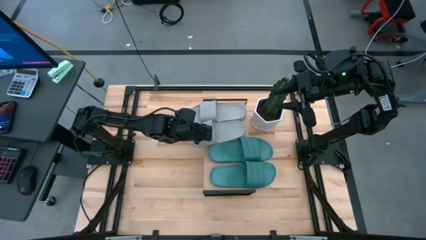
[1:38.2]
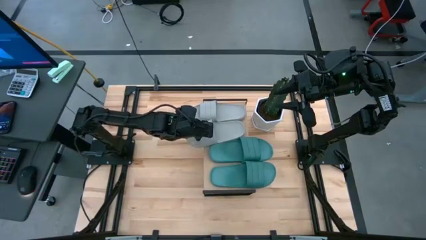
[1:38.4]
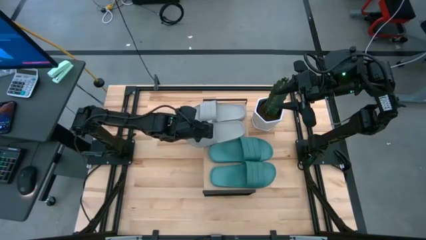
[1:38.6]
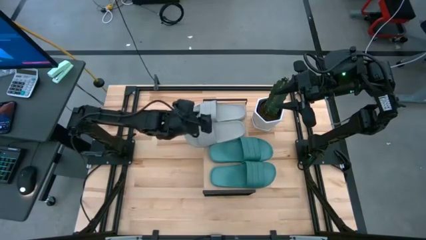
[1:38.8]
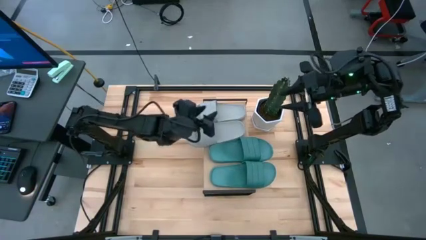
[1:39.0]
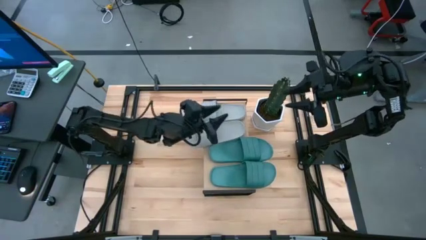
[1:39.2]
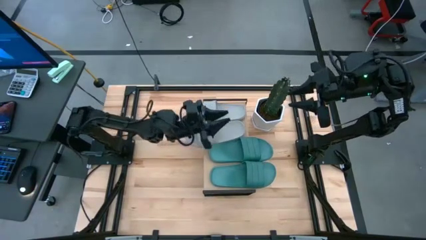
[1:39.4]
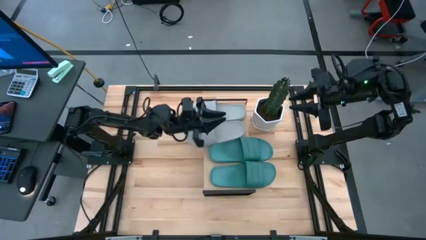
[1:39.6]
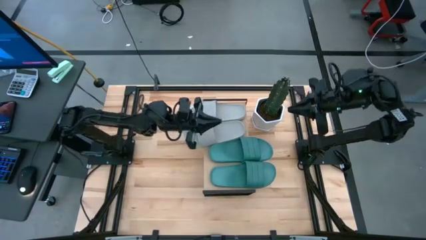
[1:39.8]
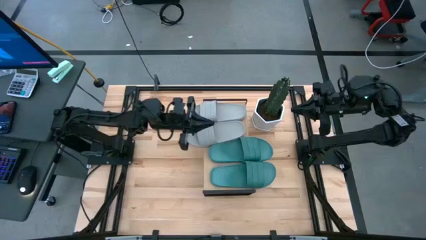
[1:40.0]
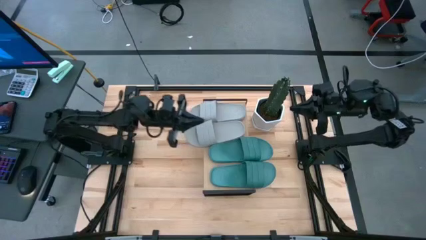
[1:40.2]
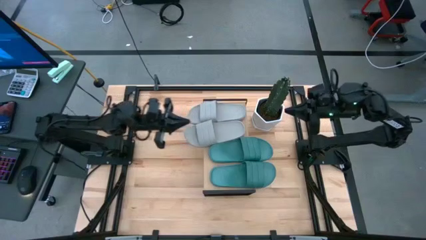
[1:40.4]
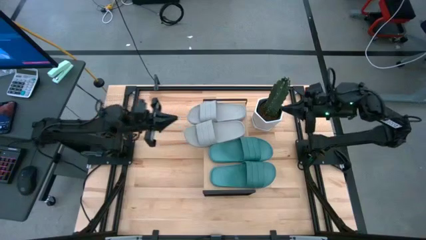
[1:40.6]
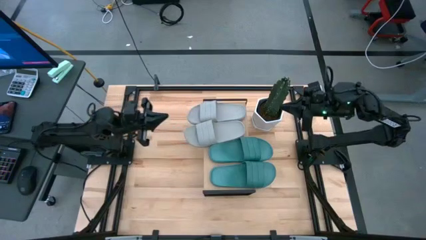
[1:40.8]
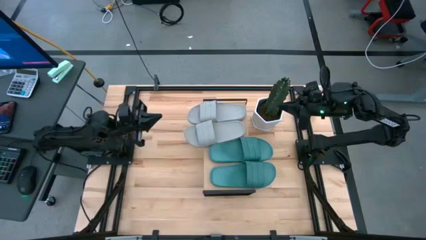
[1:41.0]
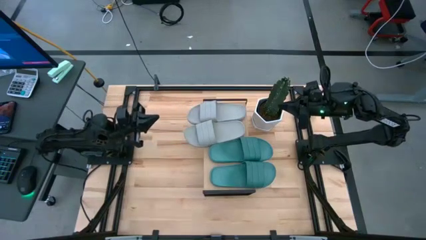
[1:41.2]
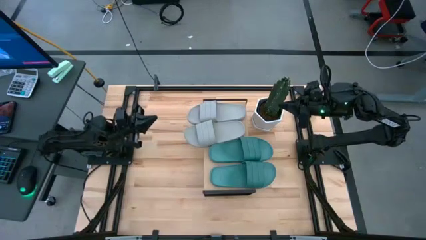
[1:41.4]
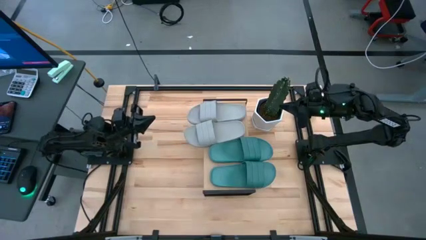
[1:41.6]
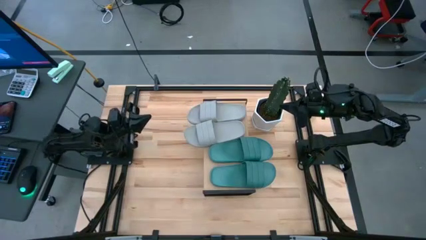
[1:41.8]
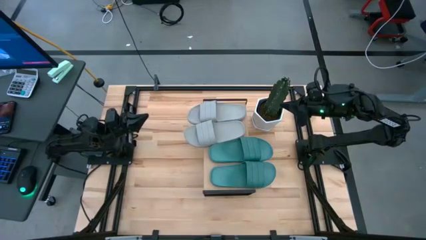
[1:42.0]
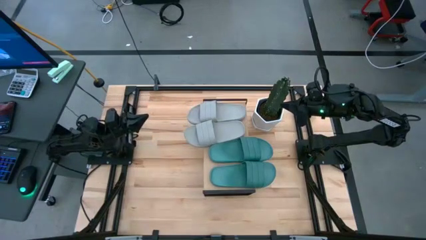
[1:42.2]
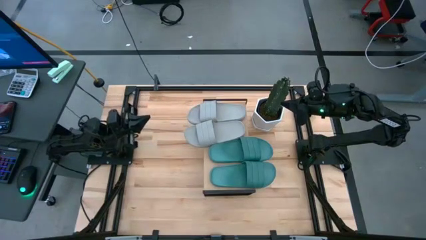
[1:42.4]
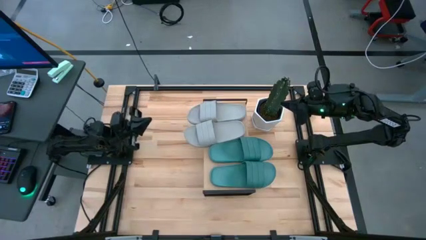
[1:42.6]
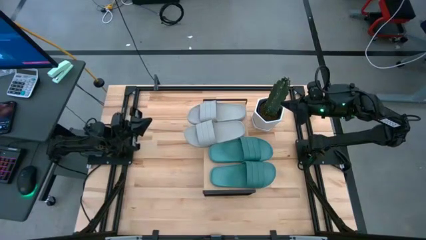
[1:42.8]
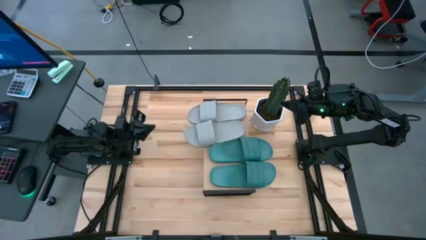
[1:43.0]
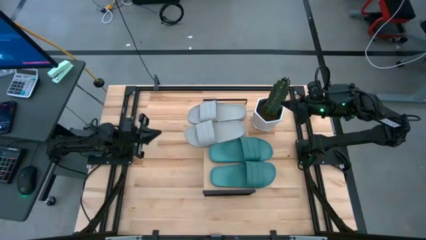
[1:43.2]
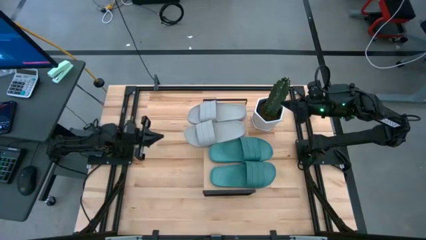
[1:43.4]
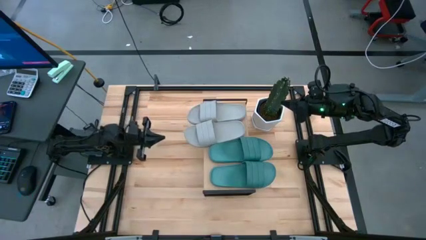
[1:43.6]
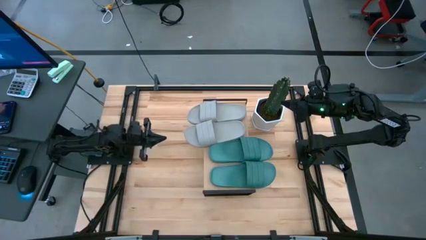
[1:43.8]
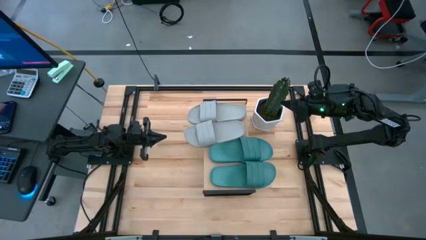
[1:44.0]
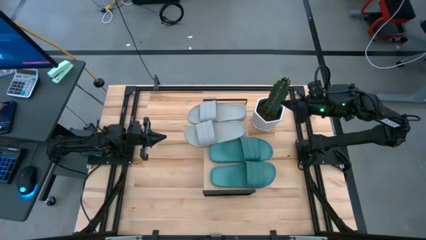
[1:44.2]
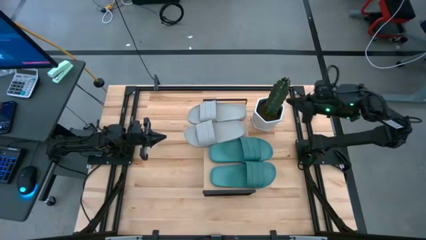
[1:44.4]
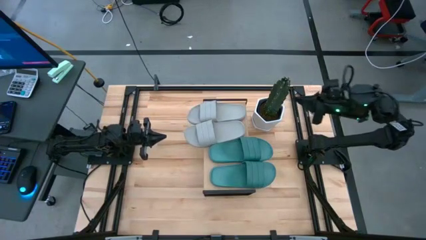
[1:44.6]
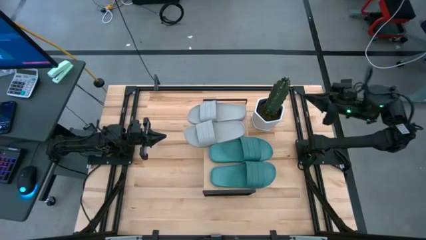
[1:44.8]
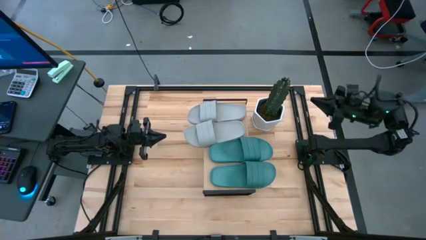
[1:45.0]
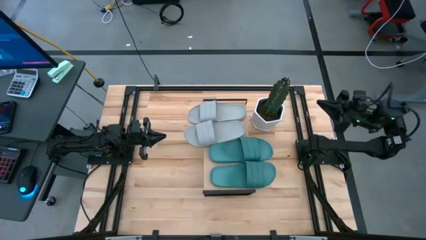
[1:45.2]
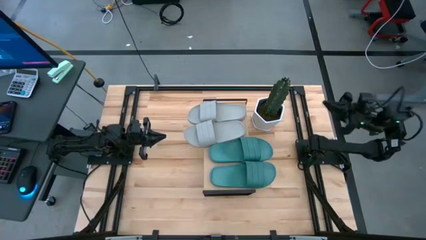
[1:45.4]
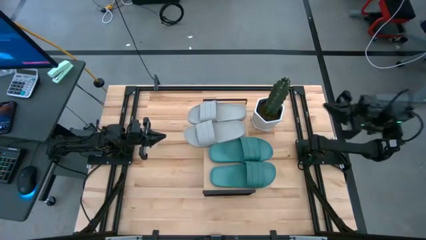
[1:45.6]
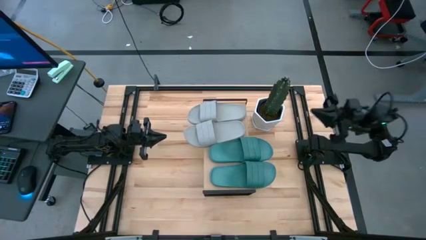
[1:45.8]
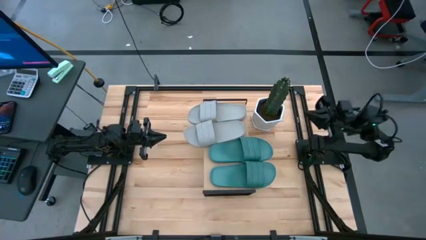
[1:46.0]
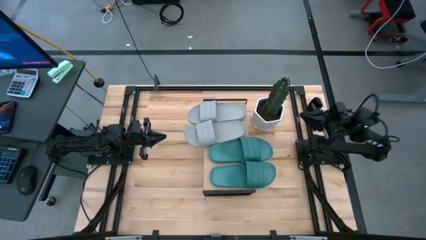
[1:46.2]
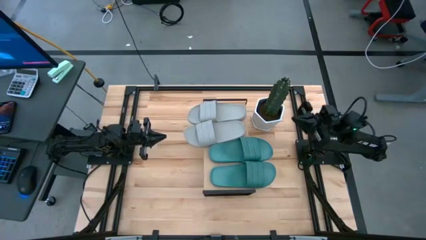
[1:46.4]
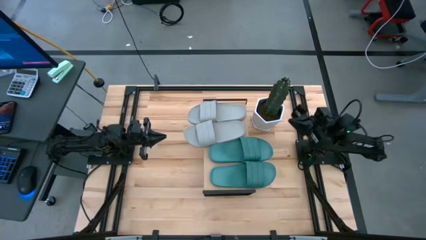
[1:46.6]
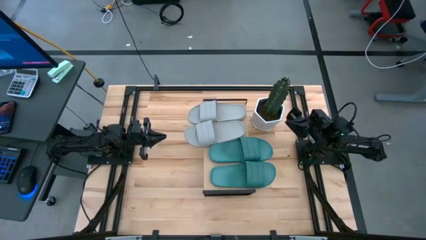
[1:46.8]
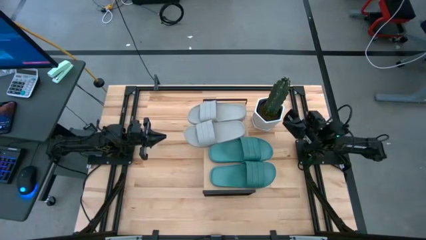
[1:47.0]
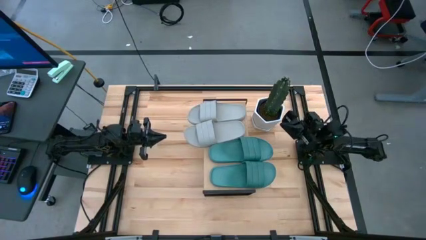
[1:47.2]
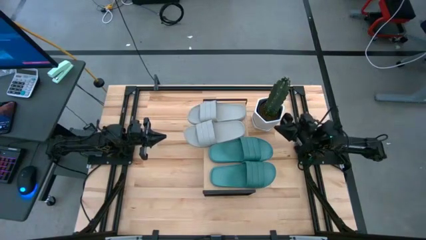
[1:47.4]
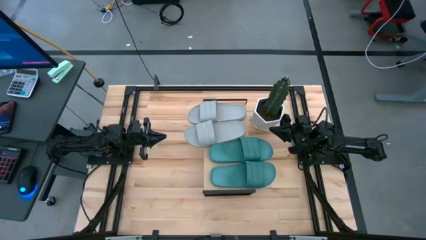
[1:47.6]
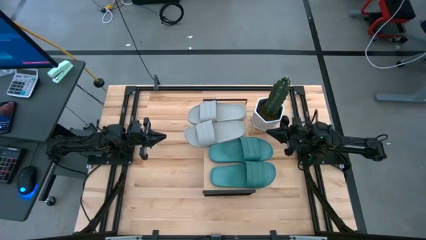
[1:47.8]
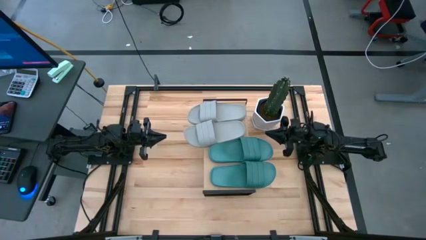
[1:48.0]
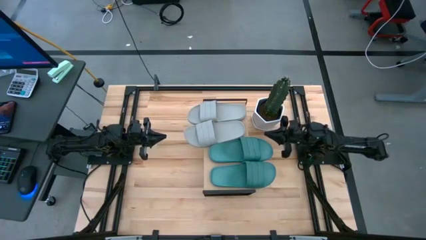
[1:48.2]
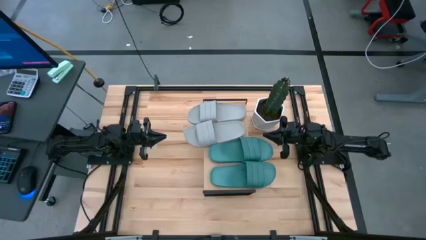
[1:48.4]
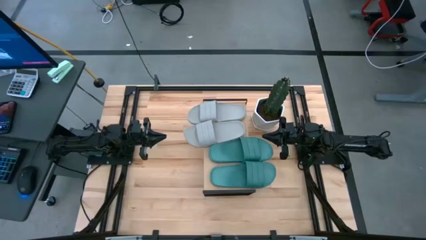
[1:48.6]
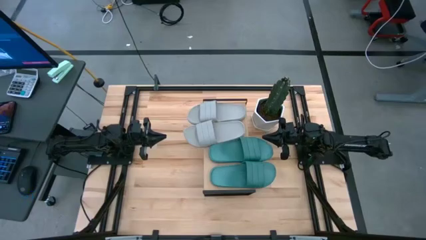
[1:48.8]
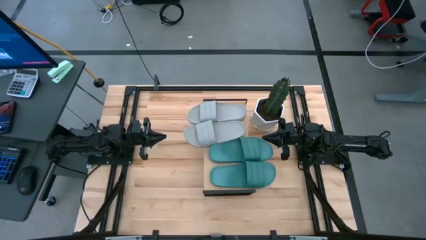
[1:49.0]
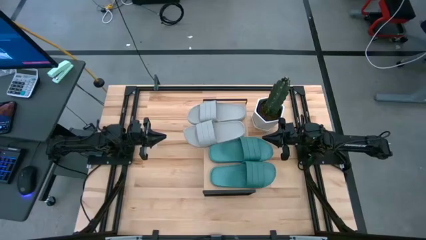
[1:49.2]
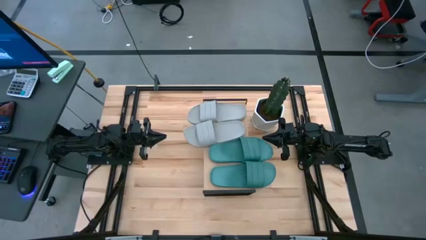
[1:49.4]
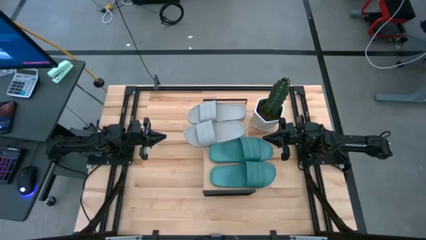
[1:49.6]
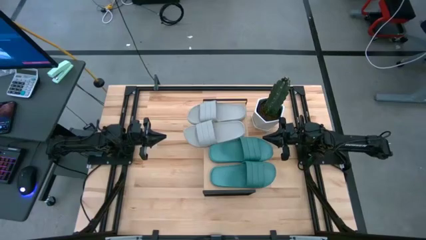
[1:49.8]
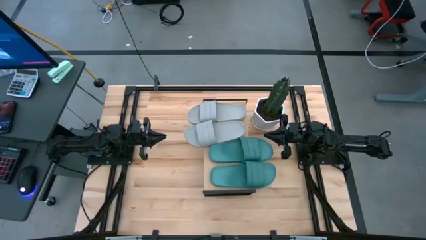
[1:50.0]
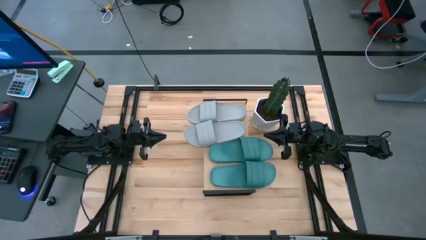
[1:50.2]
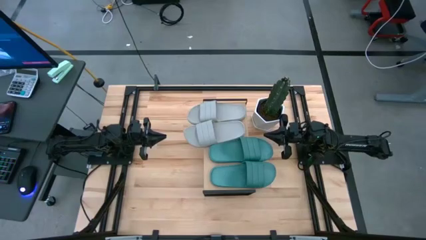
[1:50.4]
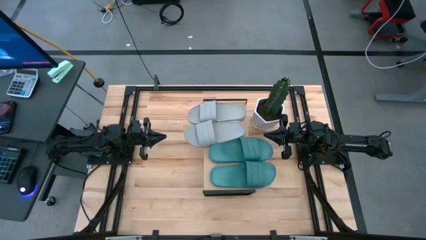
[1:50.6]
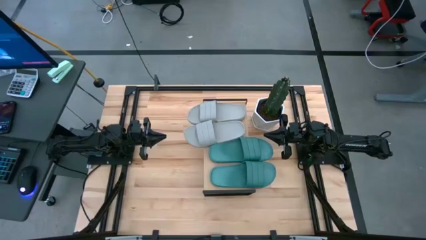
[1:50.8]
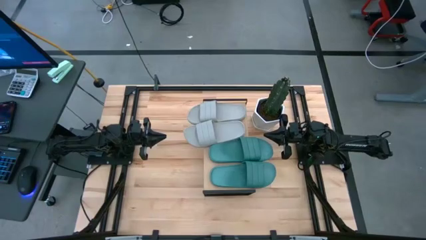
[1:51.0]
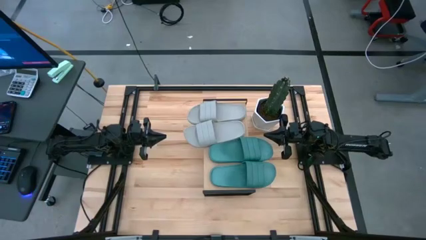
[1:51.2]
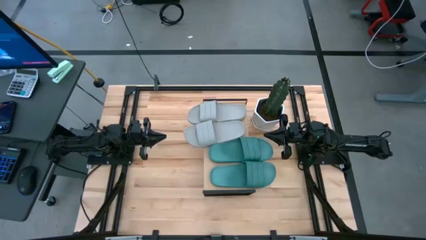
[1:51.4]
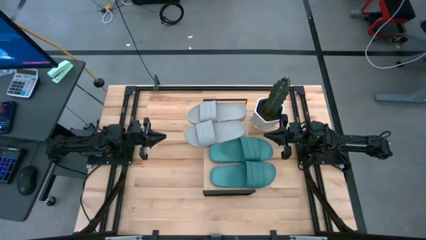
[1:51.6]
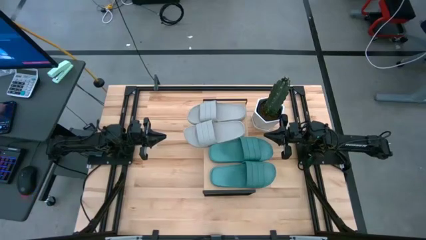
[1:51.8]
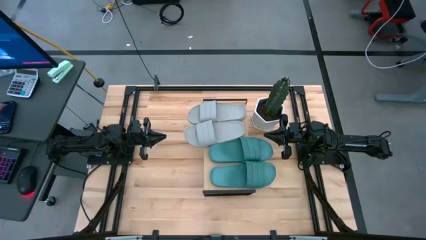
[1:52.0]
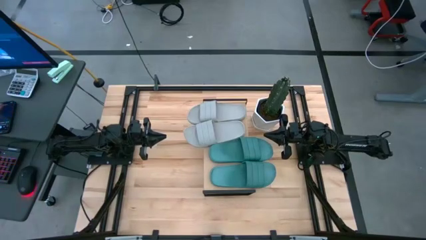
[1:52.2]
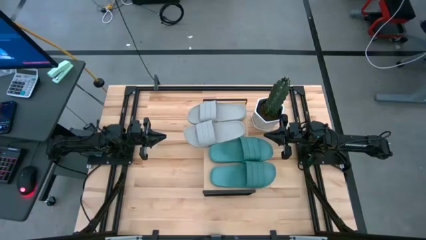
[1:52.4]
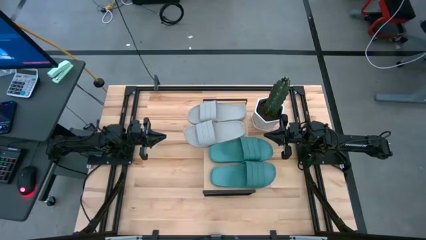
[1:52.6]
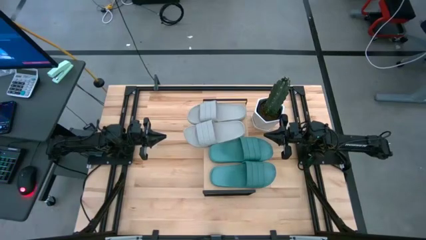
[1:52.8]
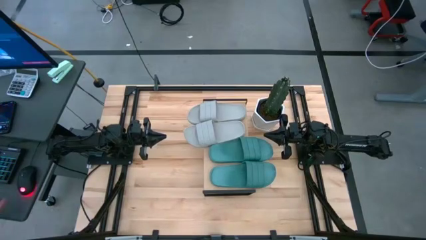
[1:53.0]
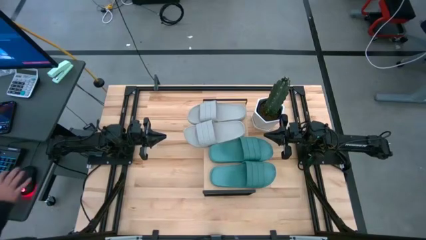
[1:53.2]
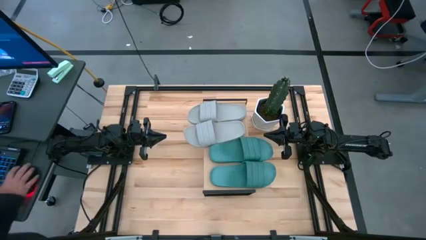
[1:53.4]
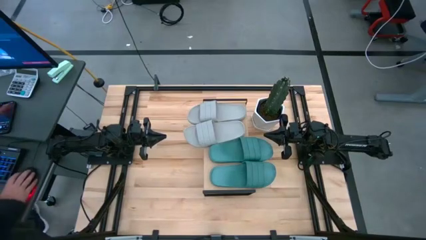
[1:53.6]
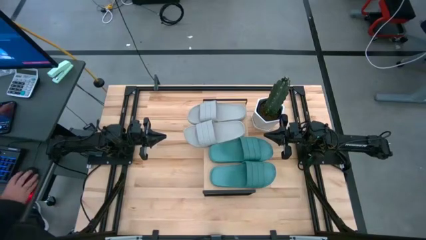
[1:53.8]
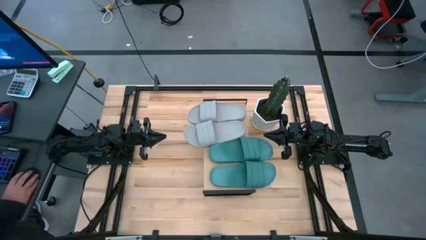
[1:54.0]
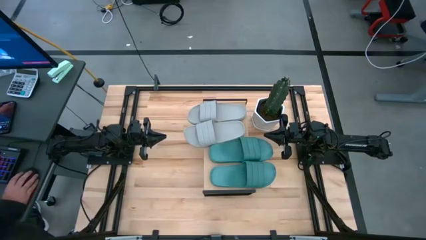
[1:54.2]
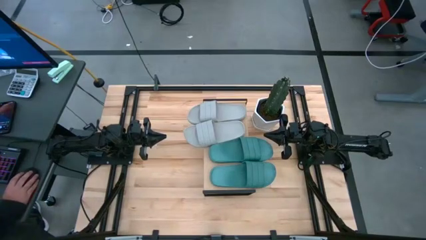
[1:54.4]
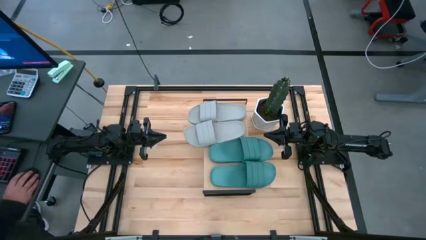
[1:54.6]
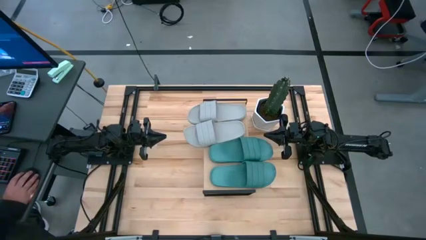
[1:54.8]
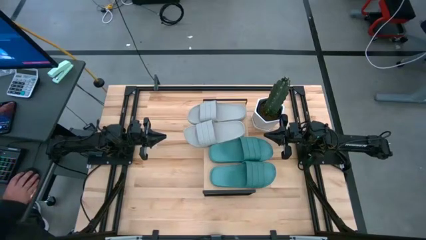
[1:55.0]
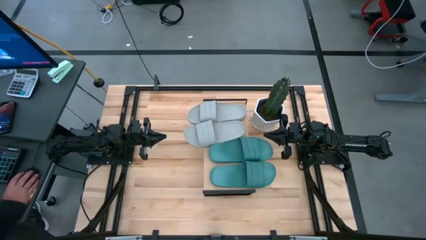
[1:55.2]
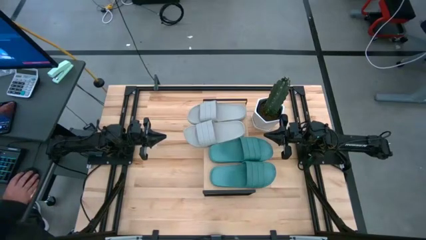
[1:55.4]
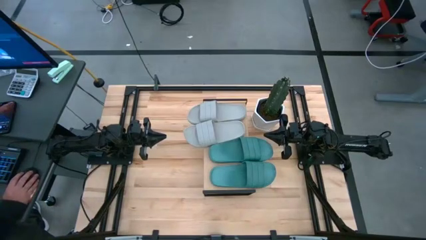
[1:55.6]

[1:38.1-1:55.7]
Task: Pick and place slides into the shelf
Return to Home Position
